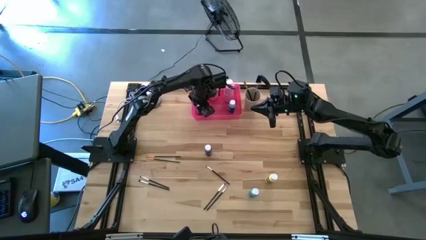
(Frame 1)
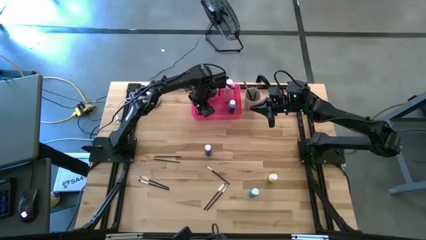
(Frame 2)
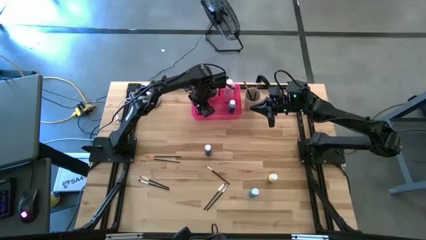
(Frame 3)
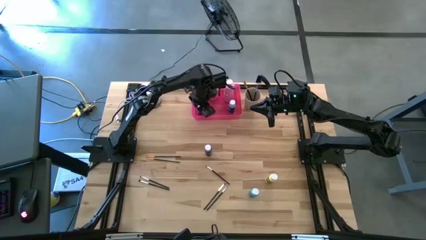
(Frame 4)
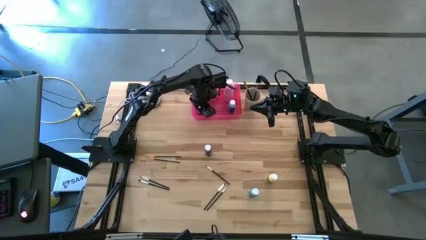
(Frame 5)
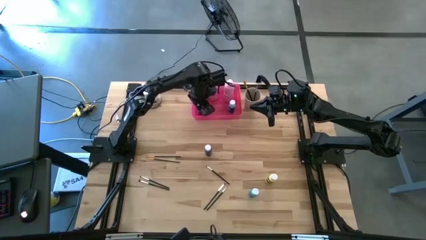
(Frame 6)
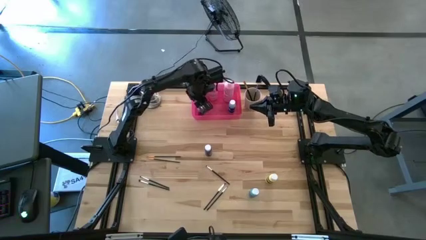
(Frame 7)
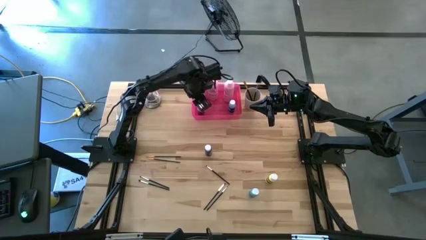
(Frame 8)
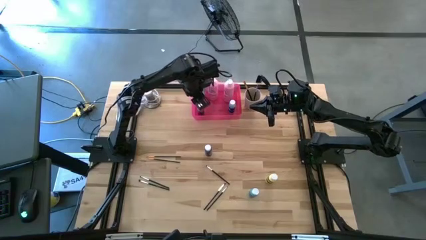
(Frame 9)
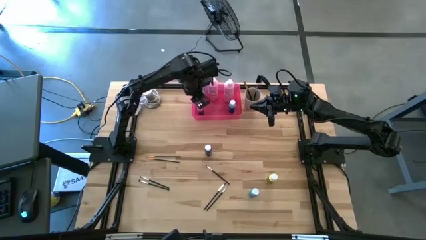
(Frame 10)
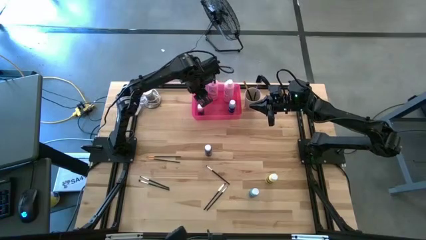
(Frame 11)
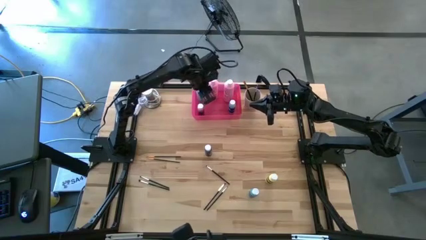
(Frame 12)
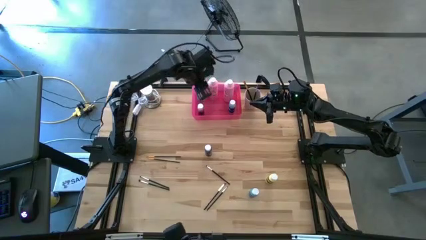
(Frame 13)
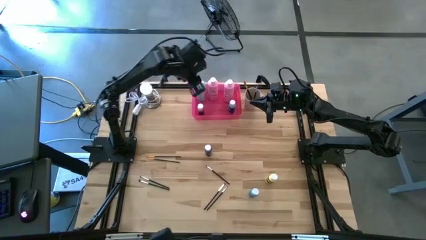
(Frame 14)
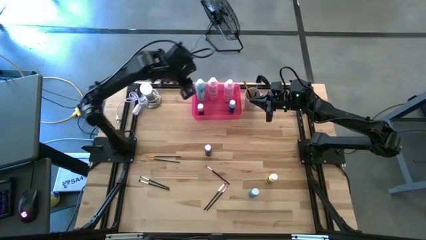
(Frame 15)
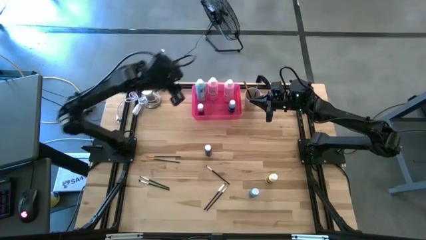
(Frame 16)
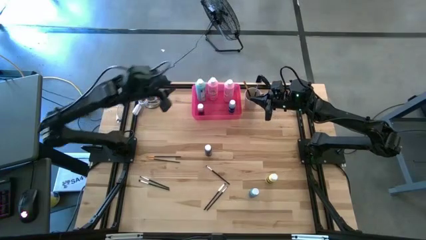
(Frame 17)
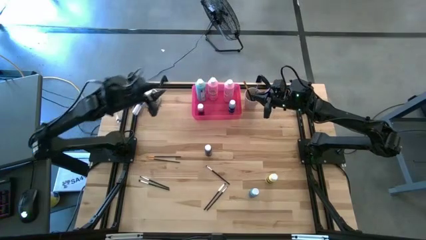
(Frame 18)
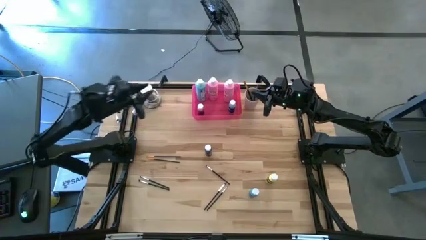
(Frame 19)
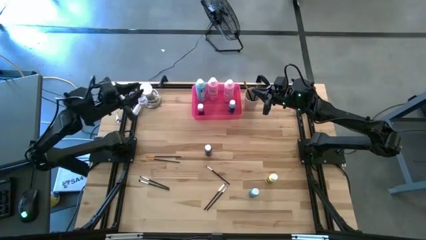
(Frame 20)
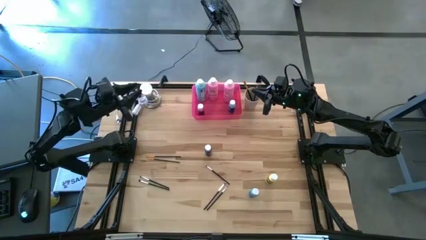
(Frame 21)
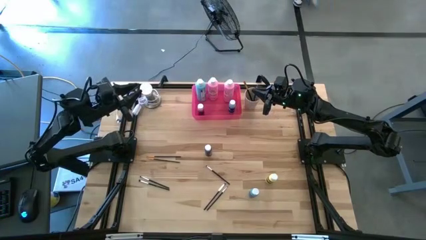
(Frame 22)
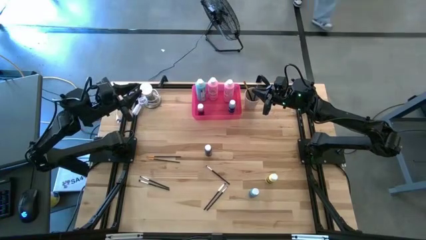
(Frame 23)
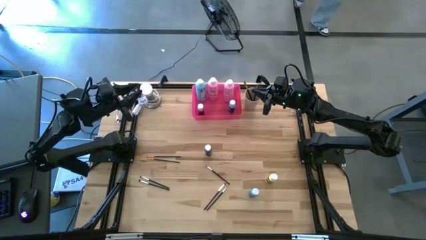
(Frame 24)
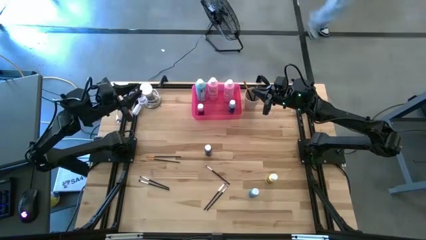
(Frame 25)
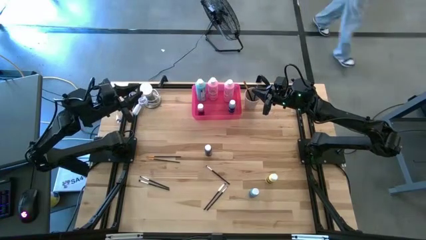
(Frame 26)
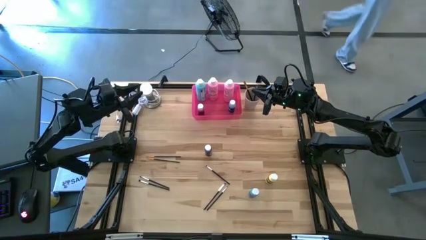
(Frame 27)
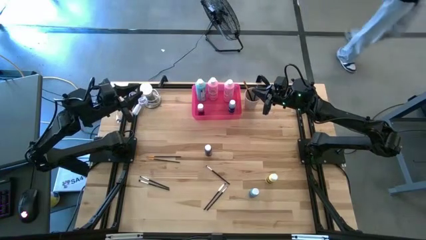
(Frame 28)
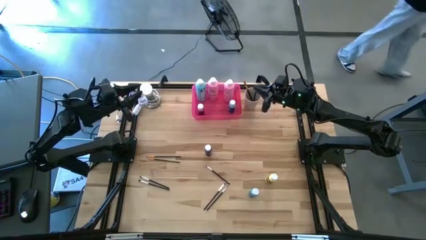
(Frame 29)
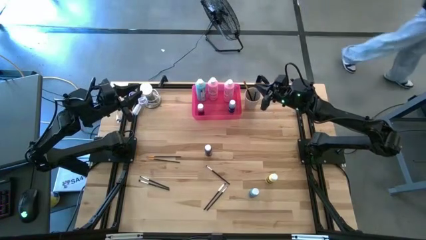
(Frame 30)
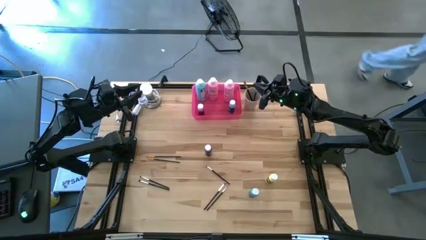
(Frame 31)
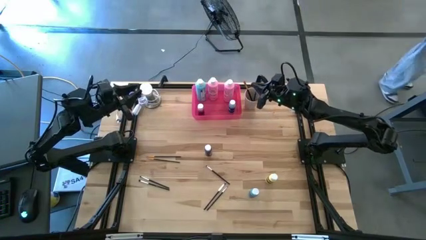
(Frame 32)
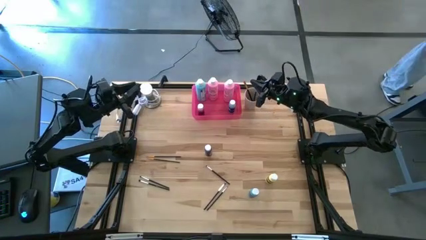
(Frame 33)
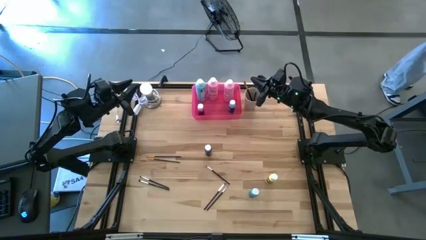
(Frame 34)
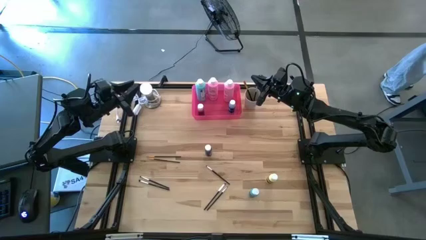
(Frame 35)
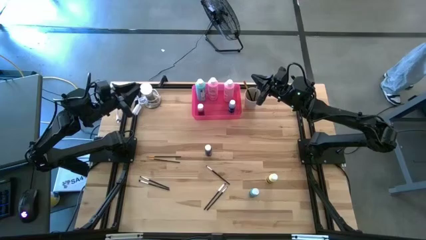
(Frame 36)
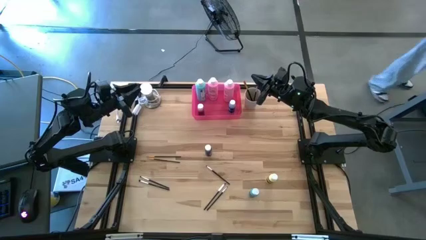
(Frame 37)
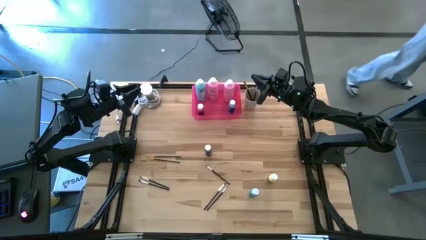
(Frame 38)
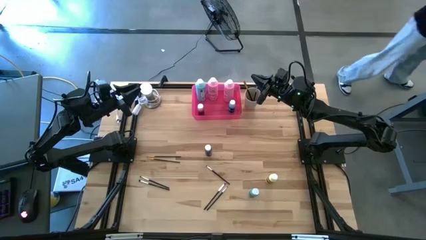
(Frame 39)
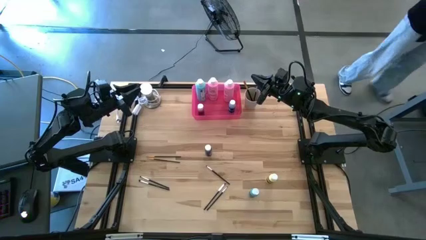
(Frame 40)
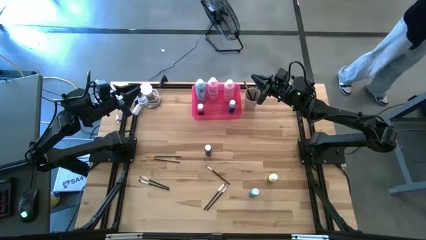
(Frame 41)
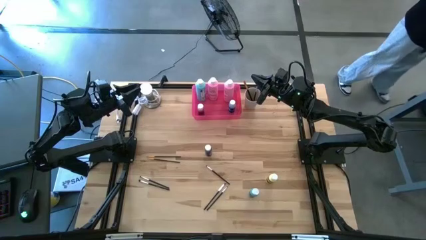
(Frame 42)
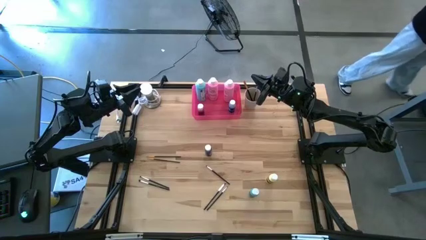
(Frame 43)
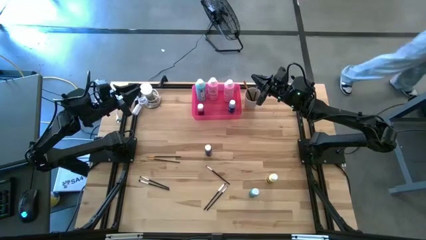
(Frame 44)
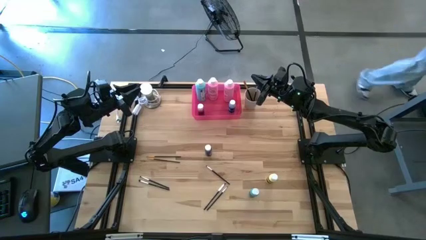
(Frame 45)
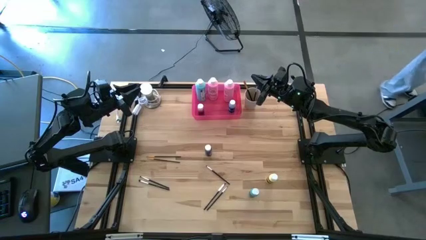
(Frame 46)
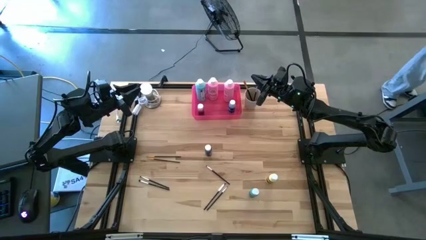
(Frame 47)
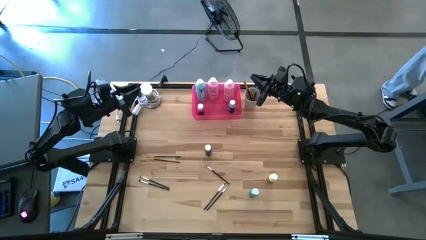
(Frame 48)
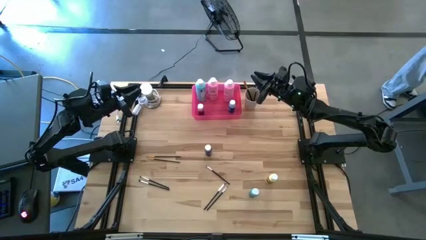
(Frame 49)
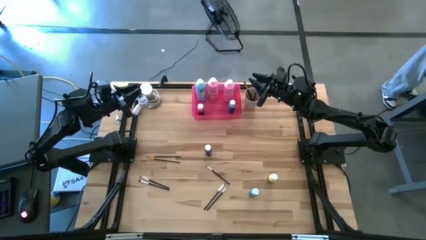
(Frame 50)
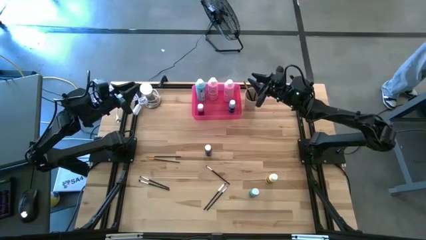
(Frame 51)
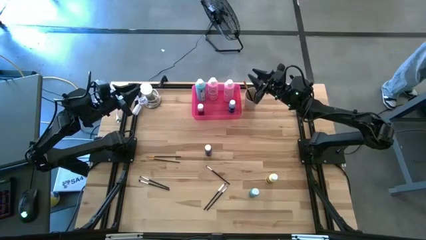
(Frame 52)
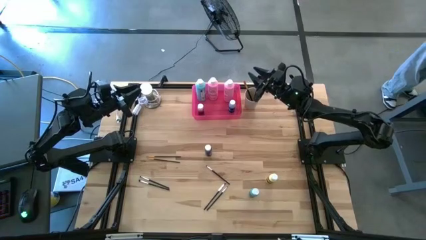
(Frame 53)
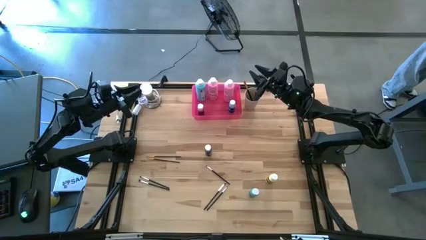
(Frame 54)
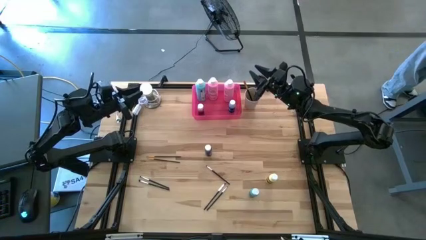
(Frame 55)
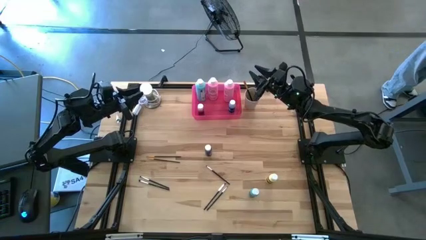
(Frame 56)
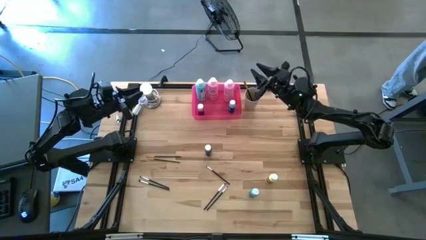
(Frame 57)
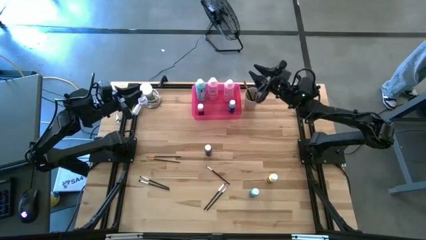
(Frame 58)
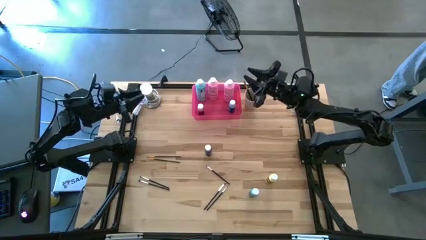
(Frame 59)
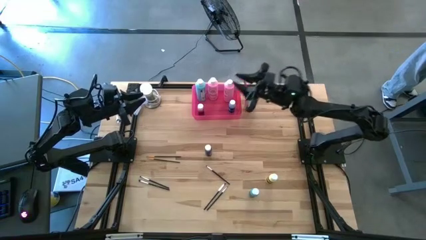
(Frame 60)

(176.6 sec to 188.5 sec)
Task: Pick & Place Paint Supplies
Put the small purple paint bottle into the pink bin
